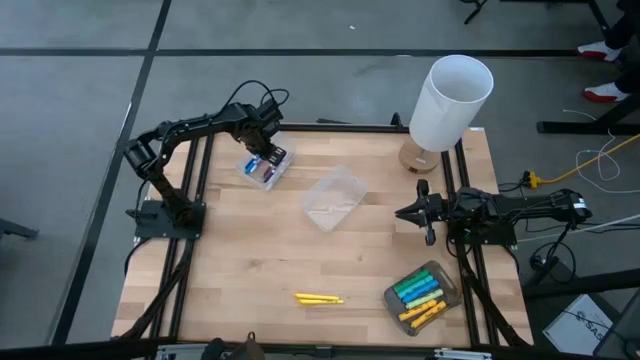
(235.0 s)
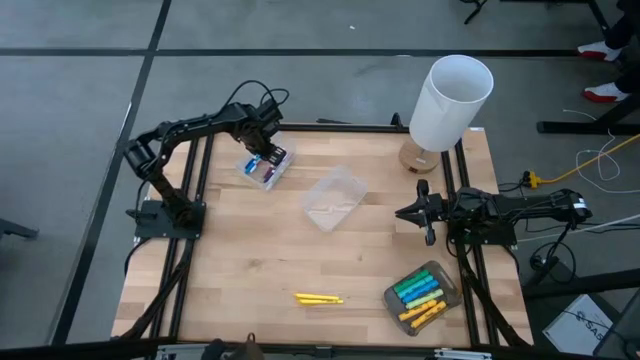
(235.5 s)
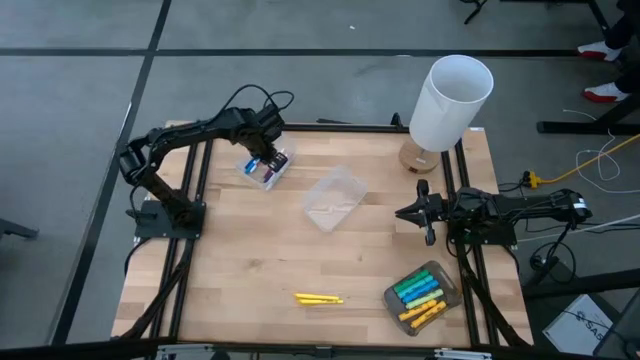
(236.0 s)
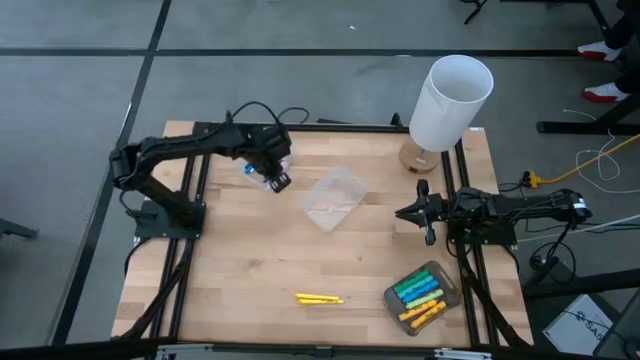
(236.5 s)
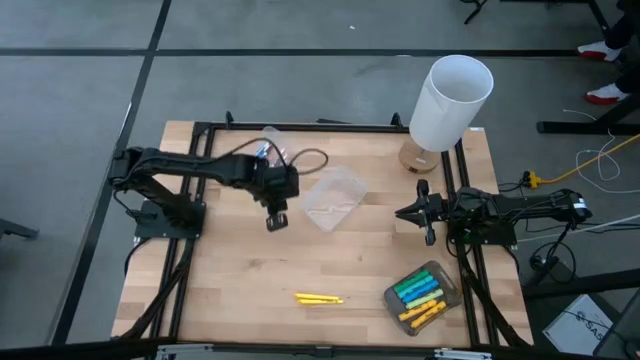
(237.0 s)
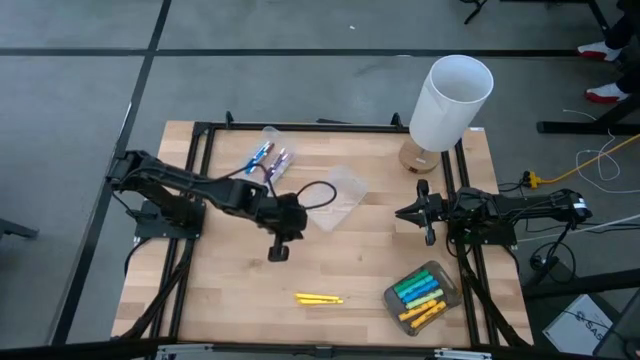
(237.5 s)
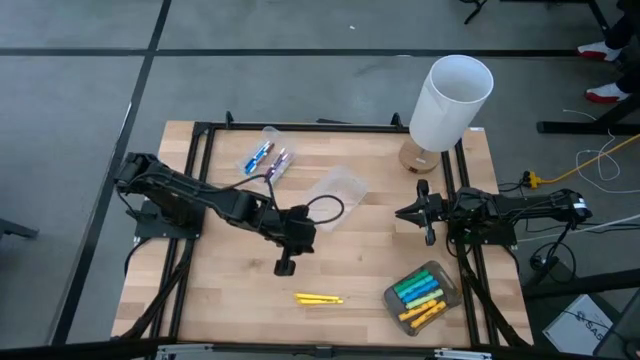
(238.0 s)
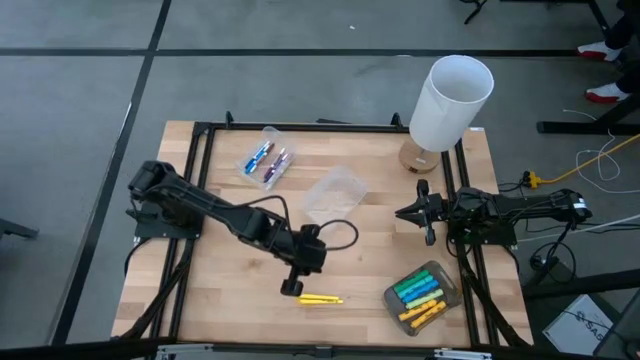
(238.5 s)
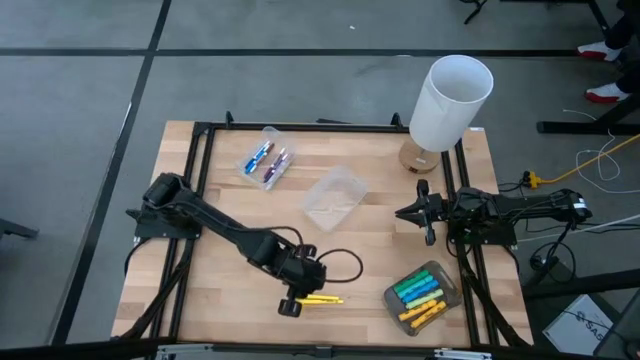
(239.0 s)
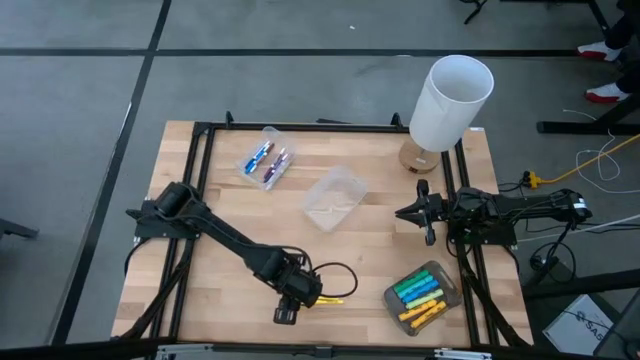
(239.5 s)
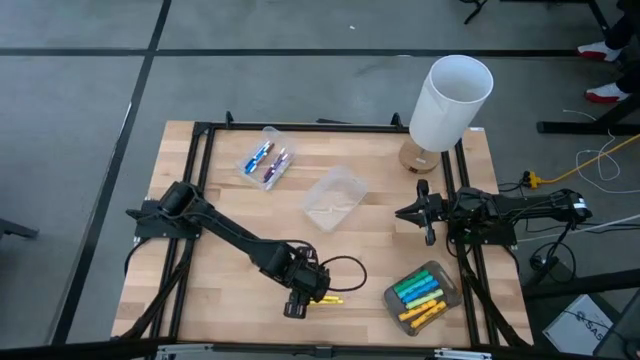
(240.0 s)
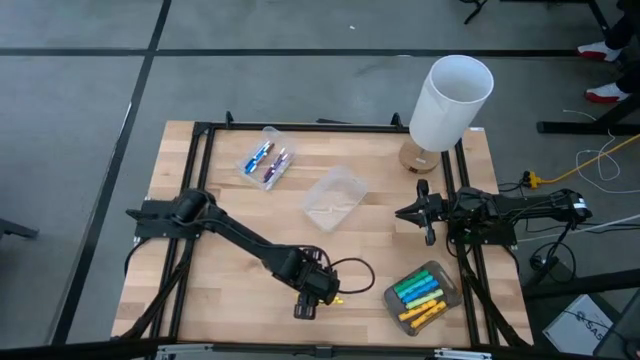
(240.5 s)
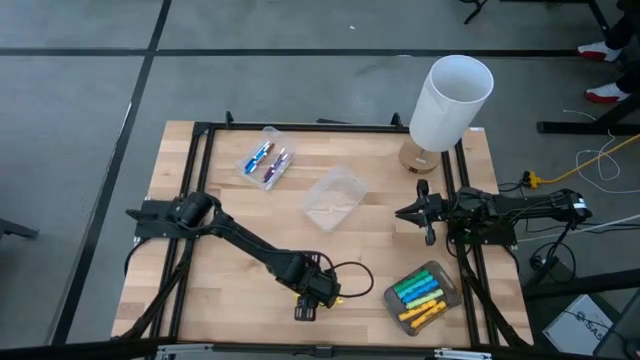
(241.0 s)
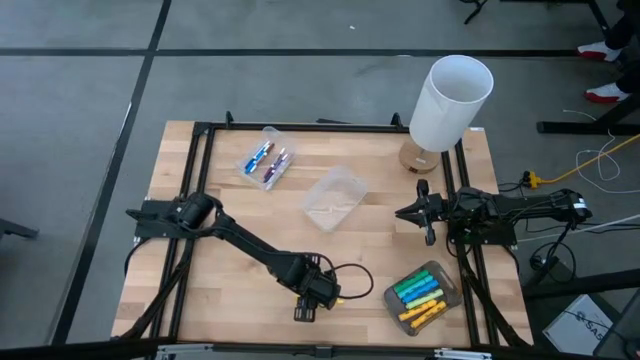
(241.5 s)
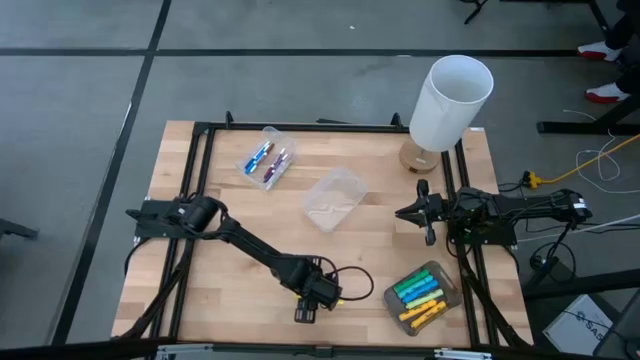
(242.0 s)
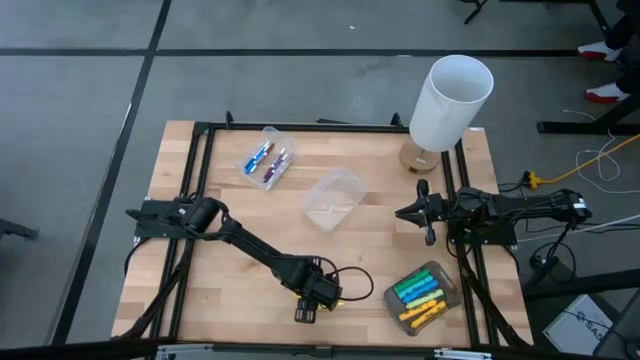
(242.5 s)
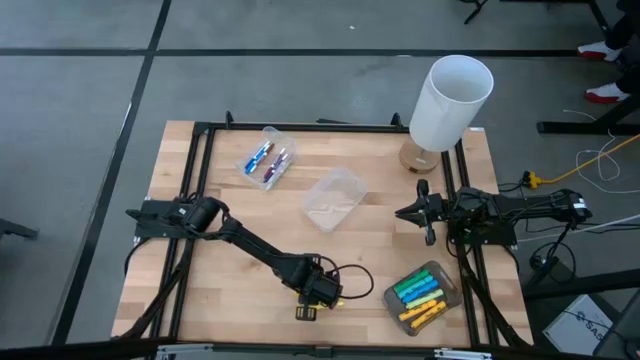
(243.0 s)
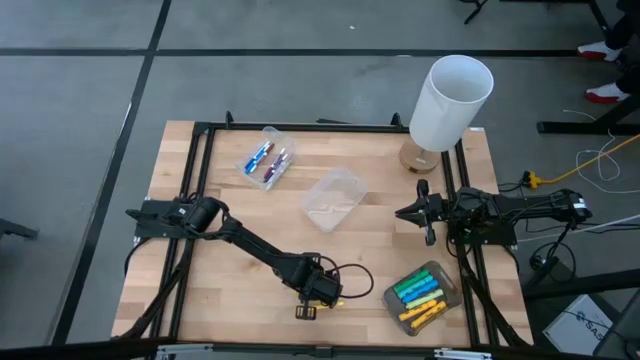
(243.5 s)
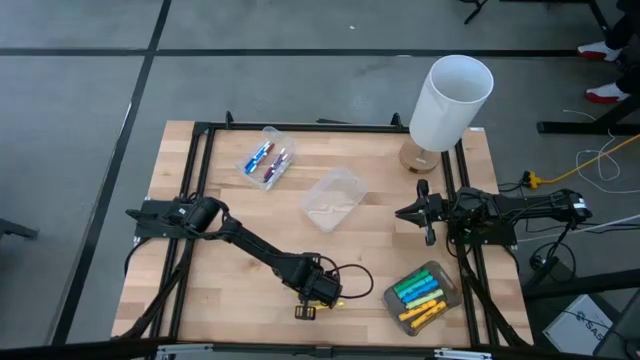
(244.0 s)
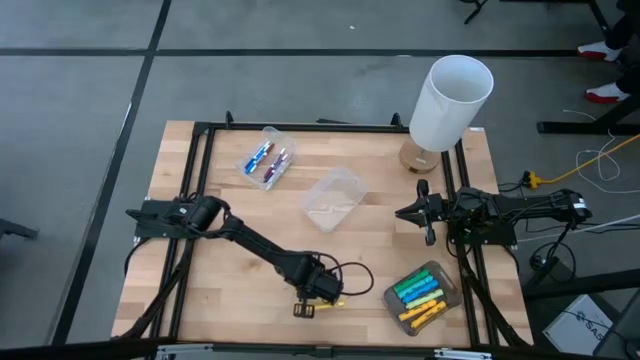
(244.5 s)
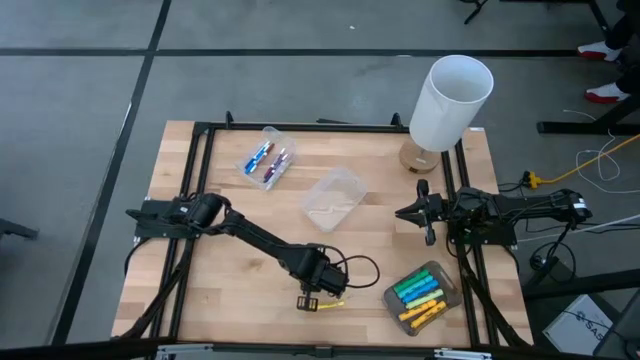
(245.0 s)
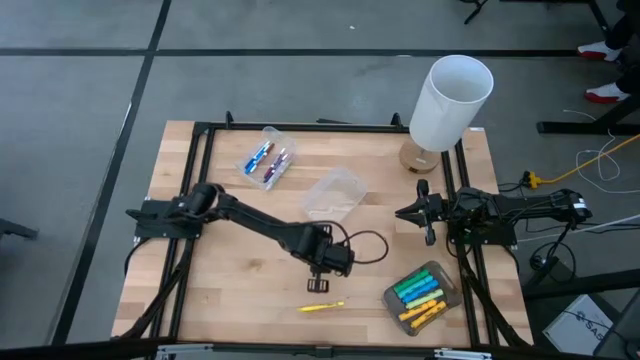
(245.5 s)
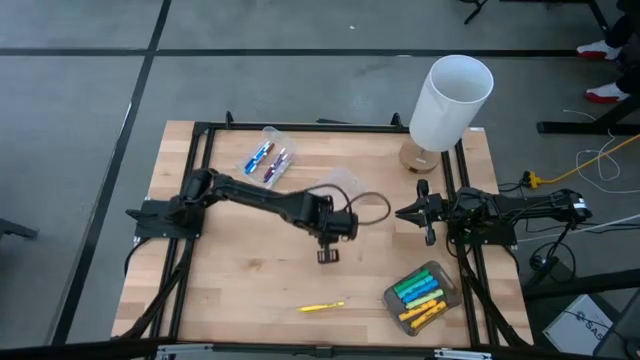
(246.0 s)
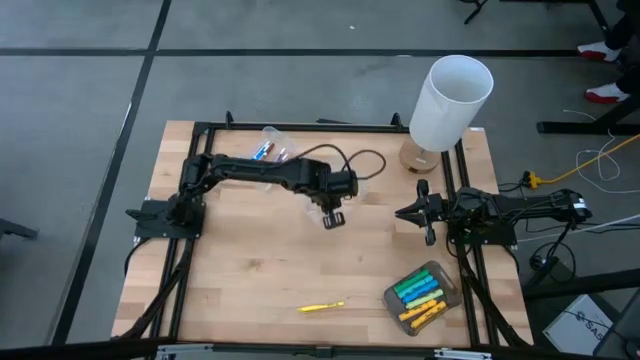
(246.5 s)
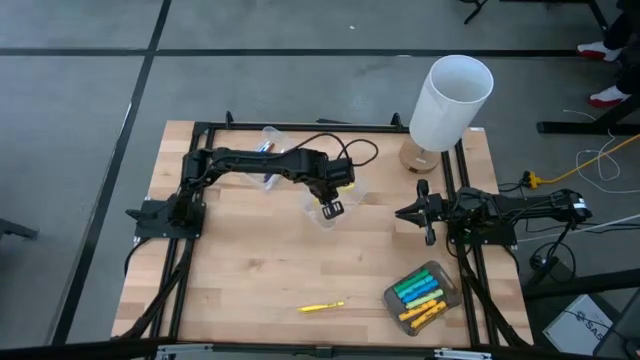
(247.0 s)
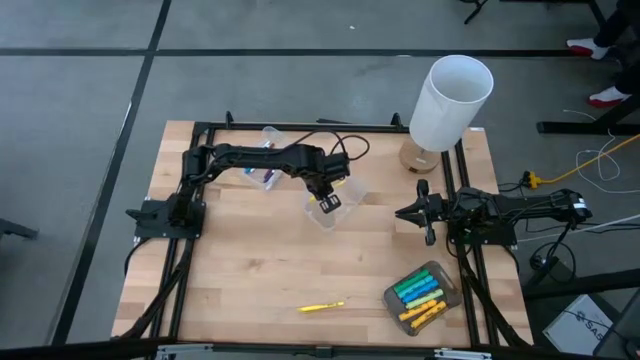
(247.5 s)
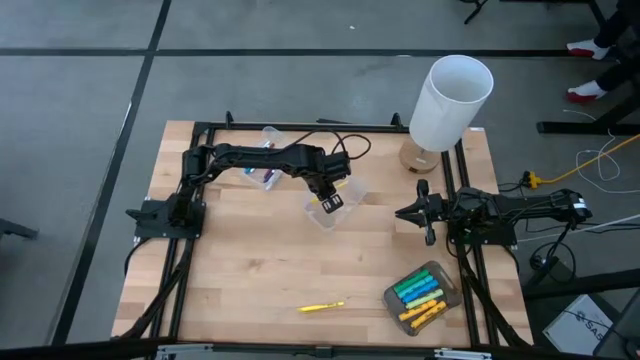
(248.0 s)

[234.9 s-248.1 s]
Task: Pick & Place Markers
Put the top yellow pen into the white bin

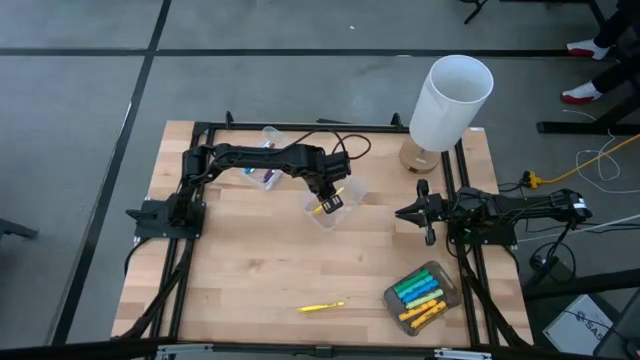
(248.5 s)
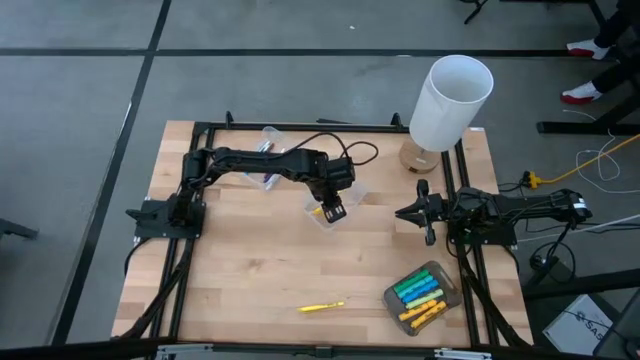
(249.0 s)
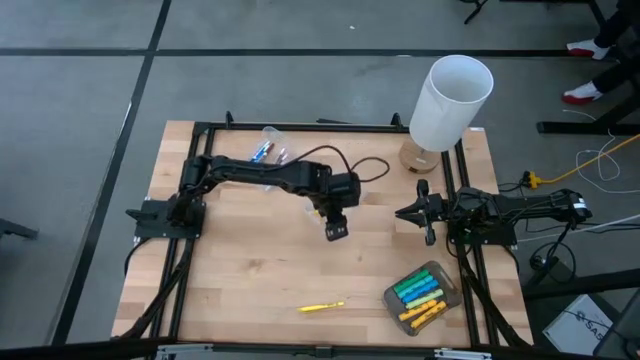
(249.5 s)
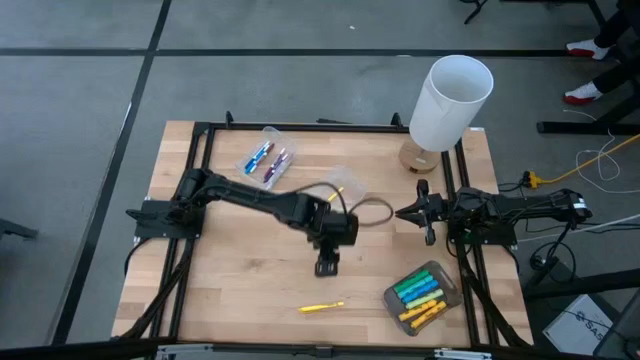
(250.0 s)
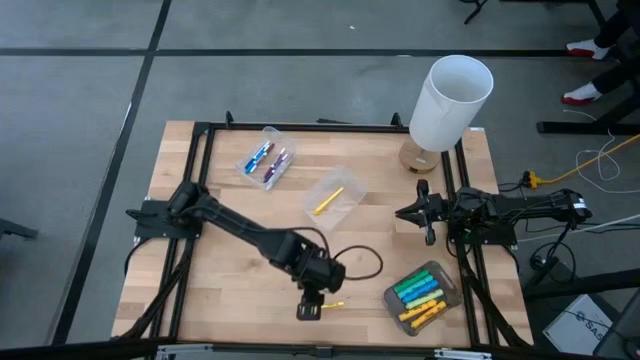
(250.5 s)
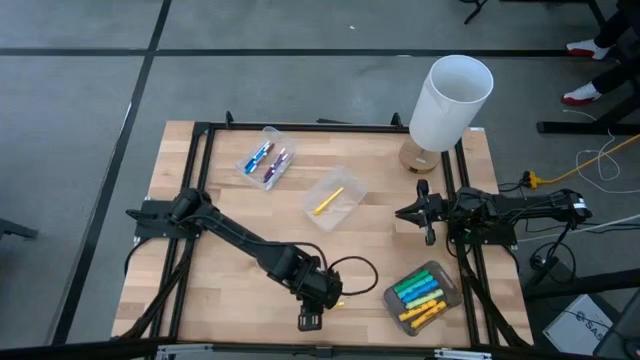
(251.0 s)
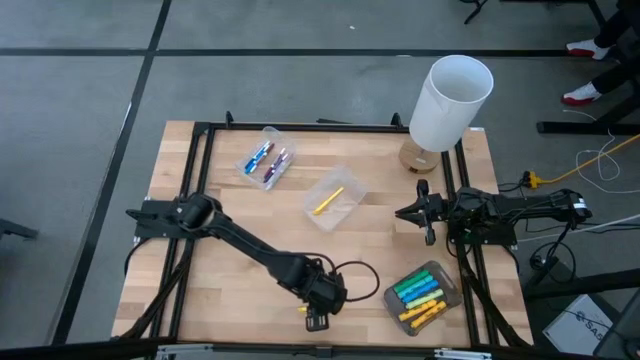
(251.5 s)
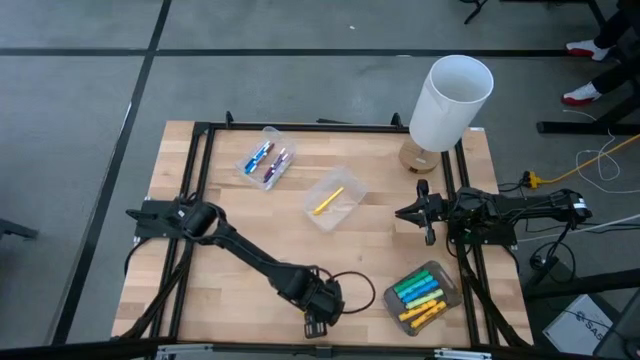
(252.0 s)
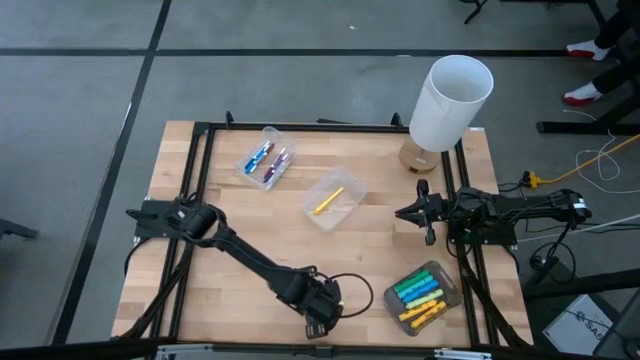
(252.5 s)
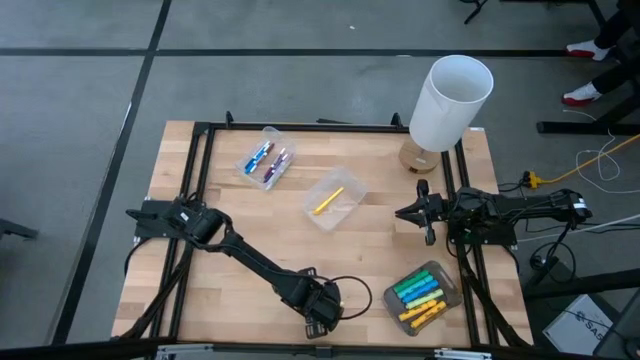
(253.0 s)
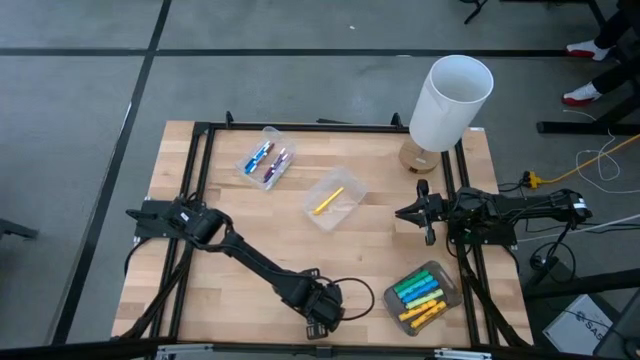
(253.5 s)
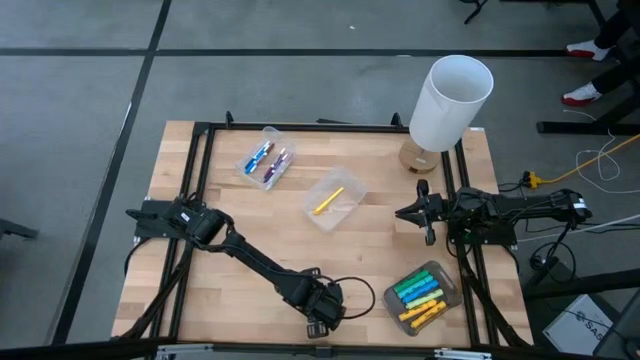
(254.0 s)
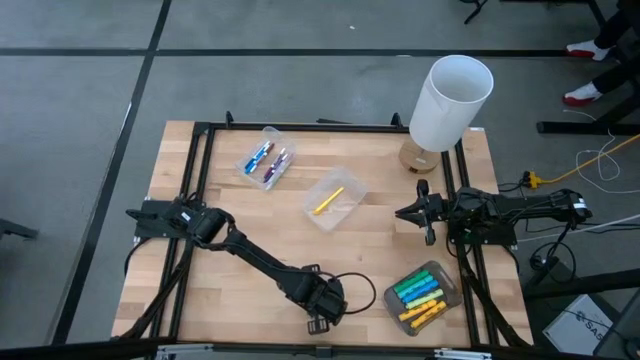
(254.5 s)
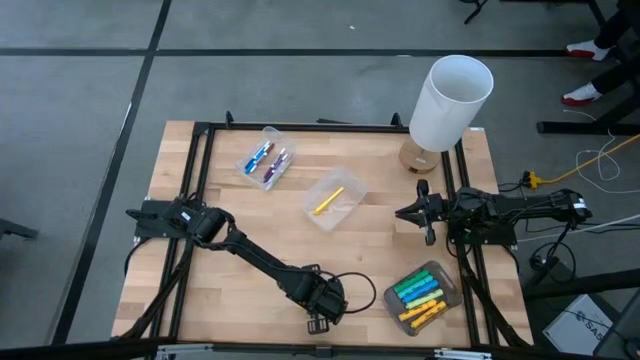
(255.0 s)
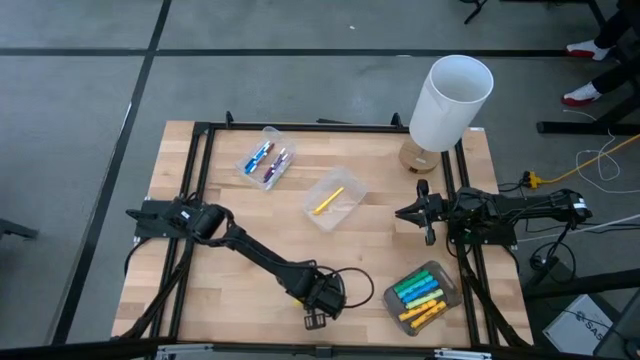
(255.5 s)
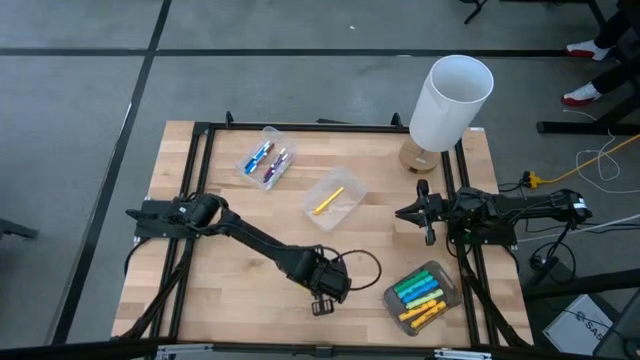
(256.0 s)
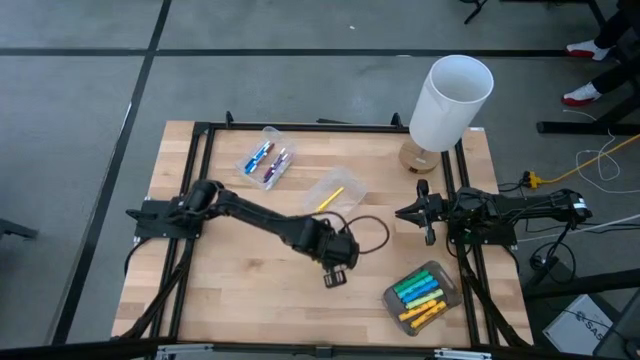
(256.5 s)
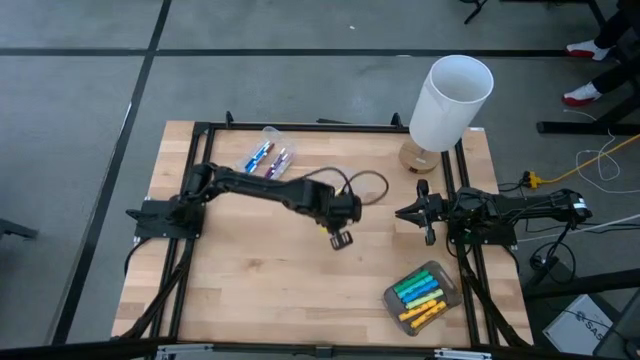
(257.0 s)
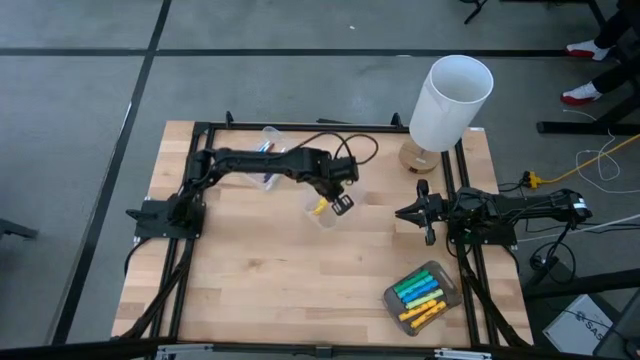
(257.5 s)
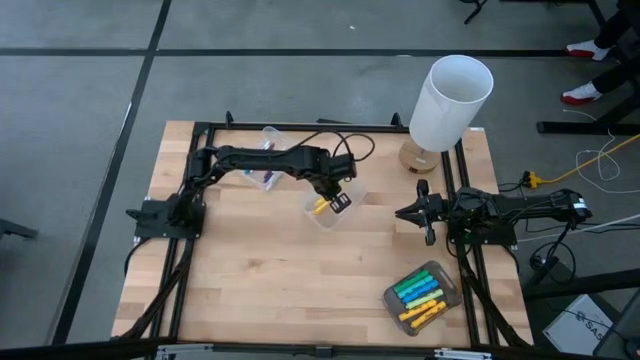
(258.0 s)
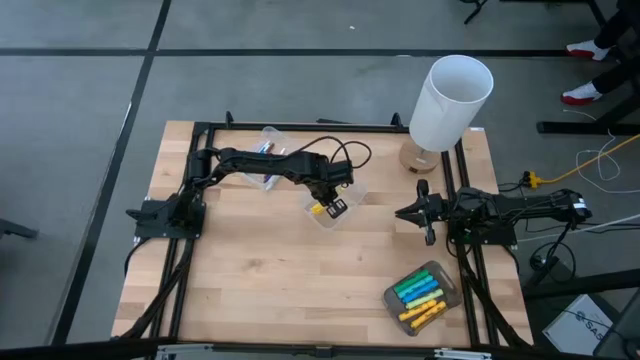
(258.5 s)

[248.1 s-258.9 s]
Put the yellow pen into the white bin
